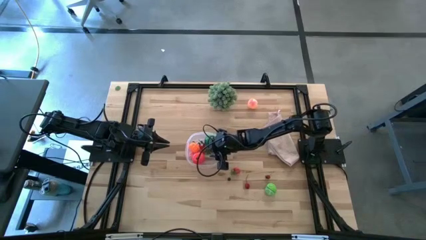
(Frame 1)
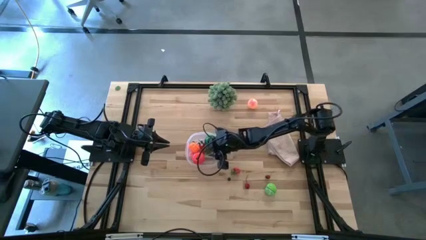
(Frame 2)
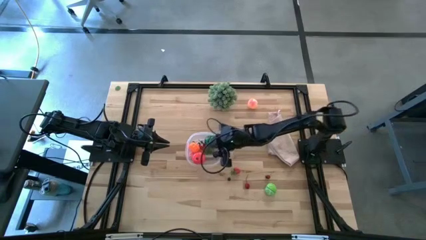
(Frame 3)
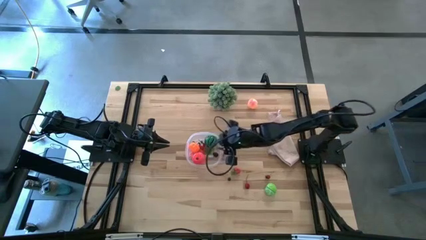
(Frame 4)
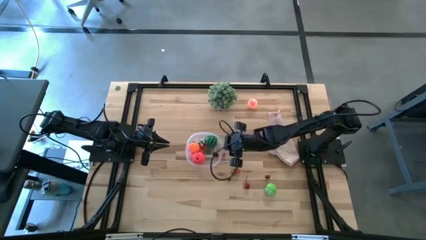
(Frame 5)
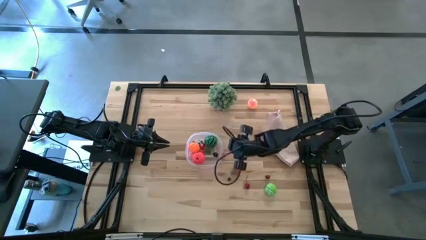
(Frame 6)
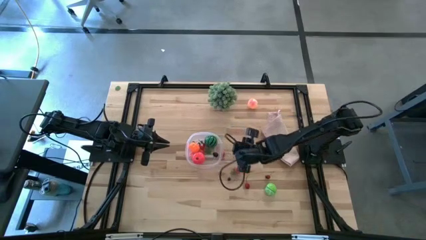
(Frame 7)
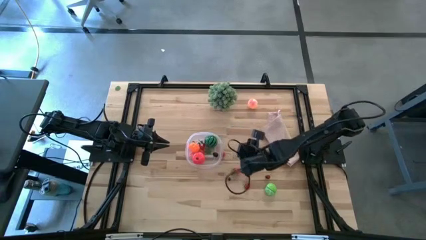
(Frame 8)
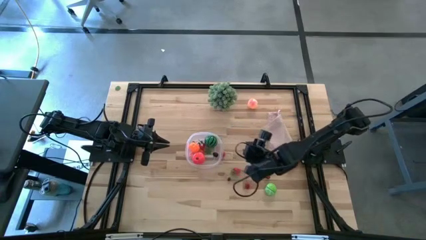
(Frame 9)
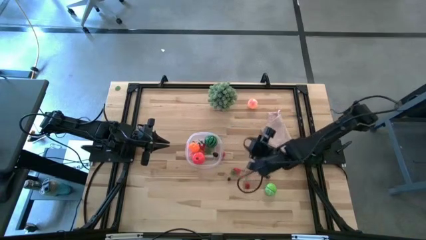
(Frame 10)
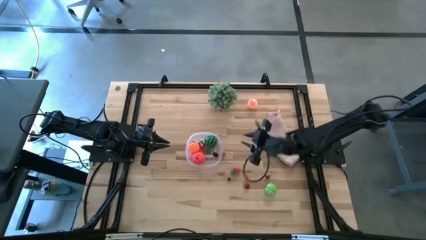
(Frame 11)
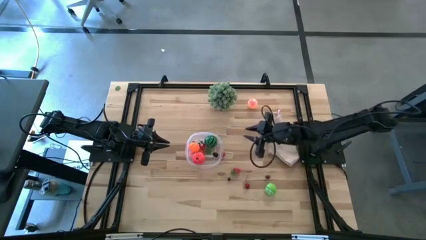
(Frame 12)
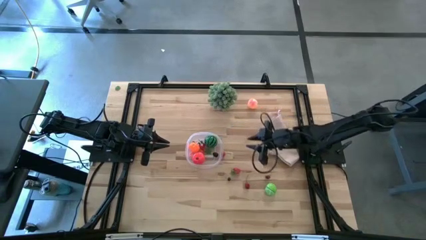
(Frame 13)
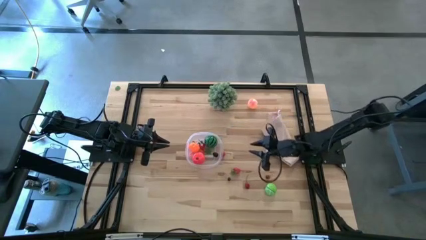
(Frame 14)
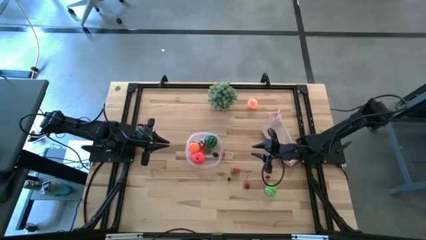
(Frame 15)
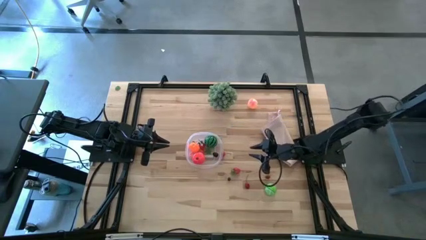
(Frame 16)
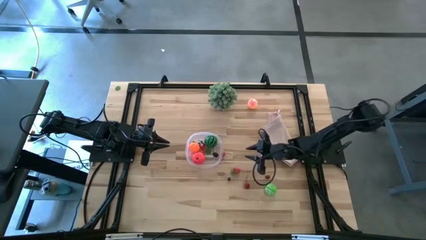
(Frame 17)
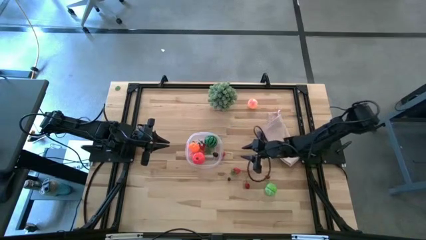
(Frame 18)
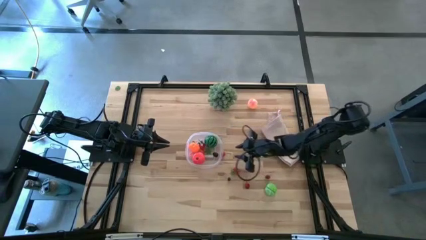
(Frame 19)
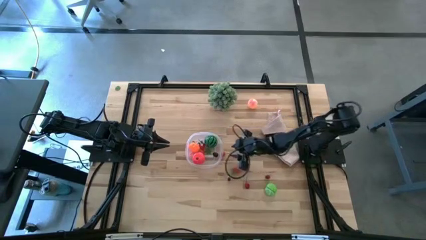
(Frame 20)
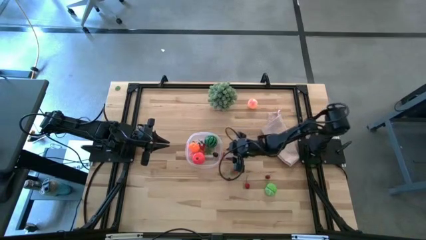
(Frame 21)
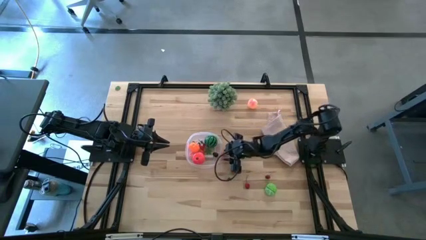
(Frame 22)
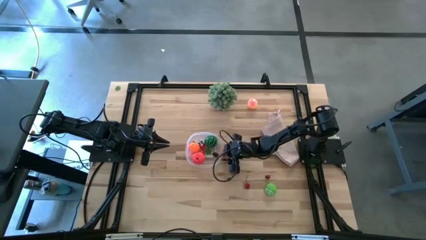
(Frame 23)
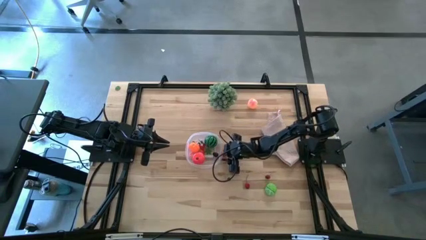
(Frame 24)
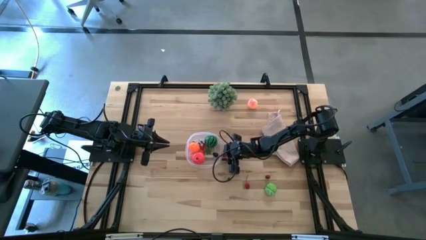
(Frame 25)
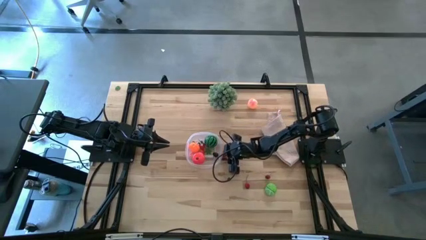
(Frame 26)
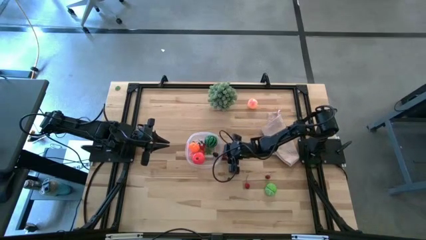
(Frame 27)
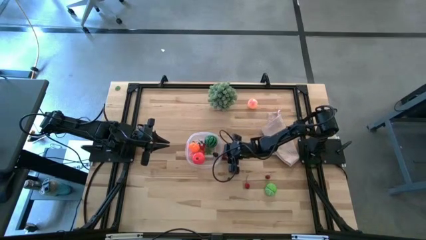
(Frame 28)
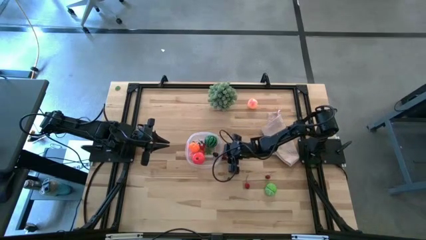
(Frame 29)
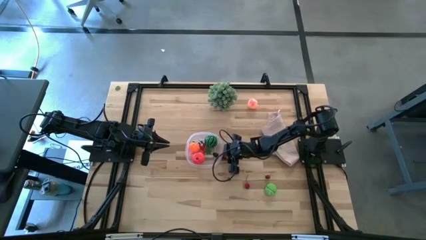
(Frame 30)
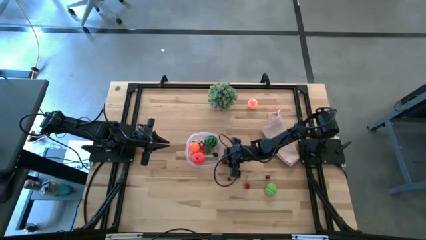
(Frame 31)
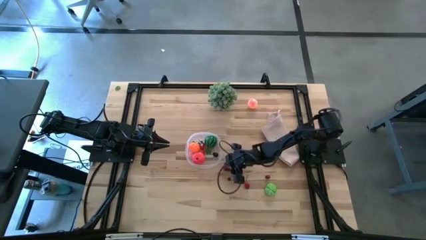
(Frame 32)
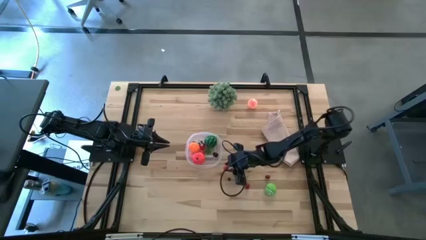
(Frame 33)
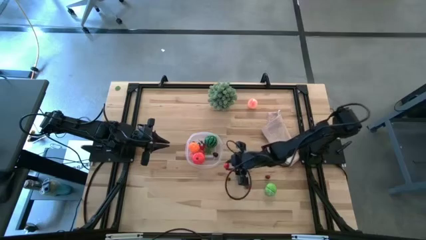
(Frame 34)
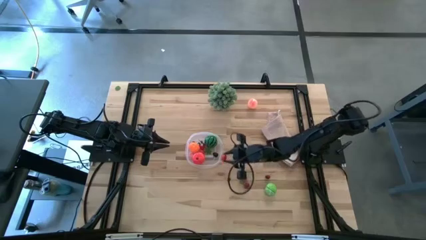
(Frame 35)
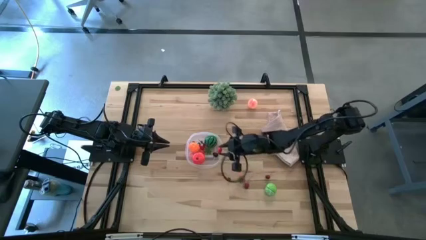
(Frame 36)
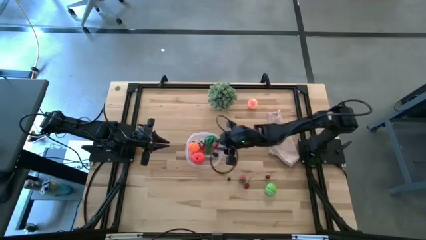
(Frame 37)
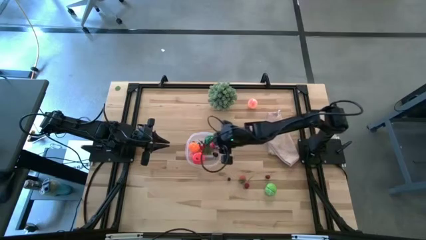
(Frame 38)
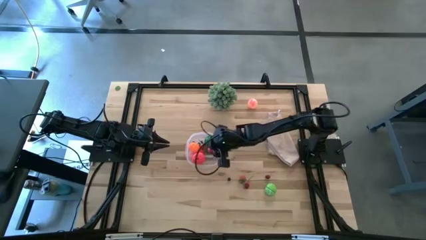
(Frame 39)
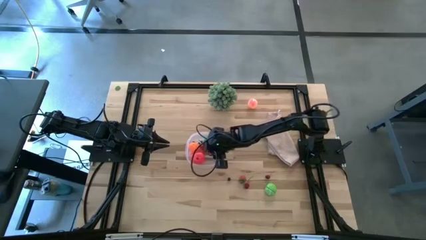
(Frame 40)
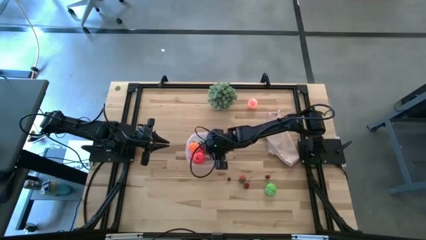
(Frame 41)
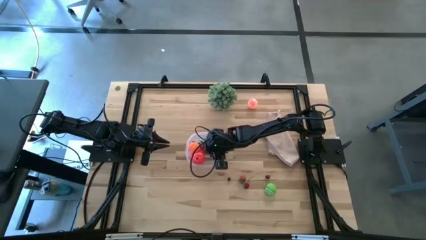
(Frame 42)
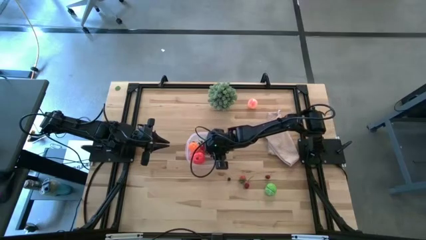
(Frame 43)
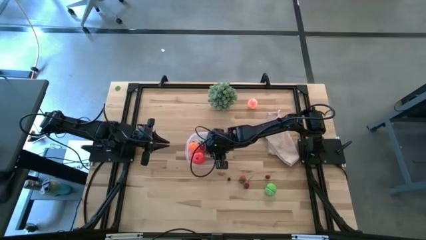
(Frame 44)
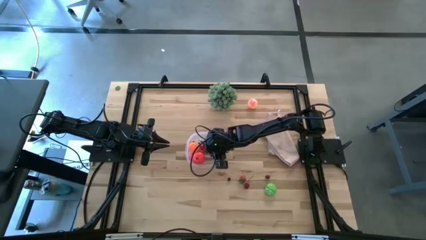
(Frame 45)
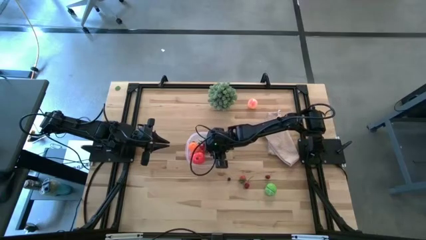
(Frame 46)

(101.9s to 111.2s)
Task: Pick and placing Produce into tupperware
Put the top red cherry into the transparent bin

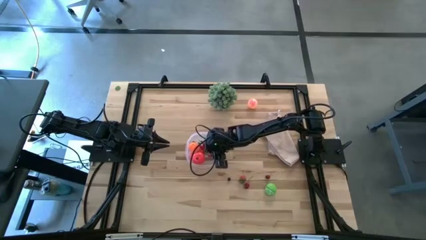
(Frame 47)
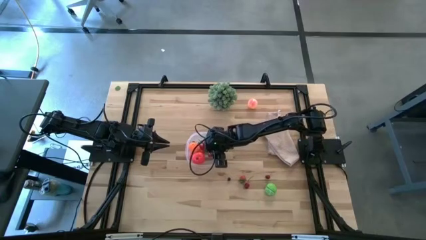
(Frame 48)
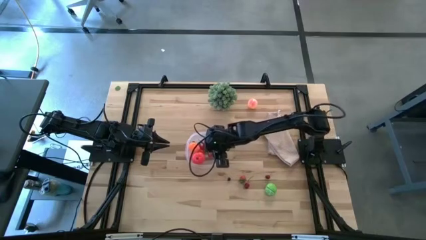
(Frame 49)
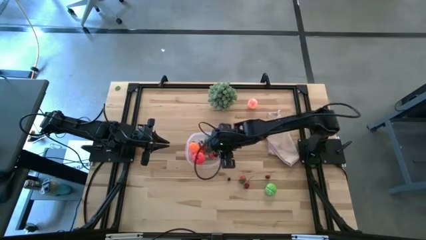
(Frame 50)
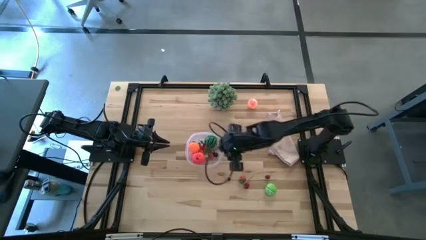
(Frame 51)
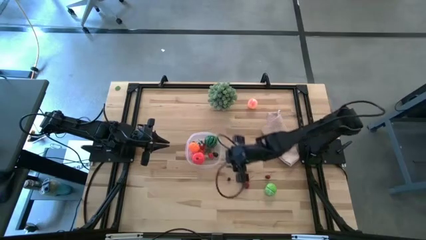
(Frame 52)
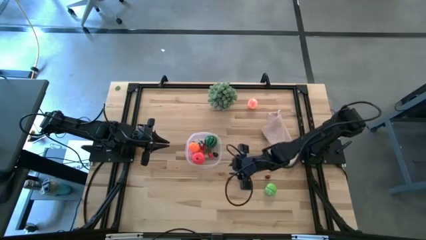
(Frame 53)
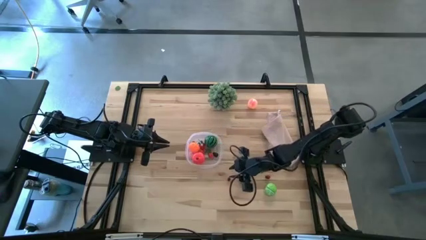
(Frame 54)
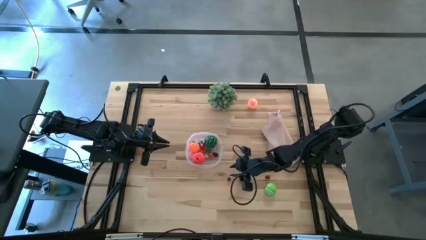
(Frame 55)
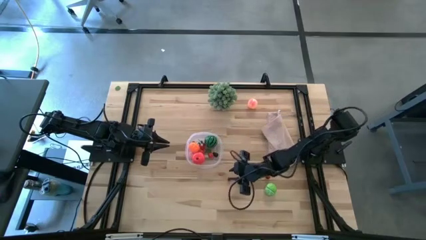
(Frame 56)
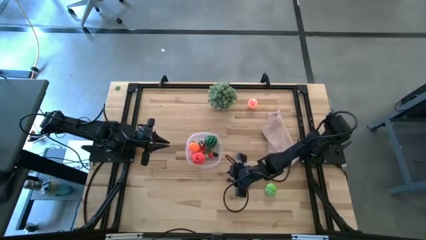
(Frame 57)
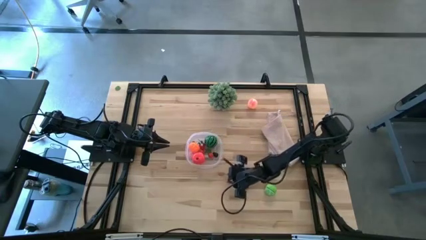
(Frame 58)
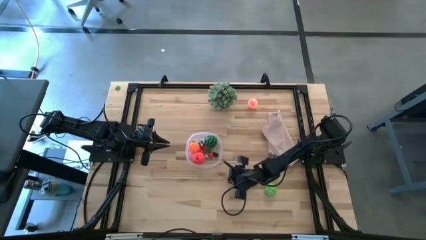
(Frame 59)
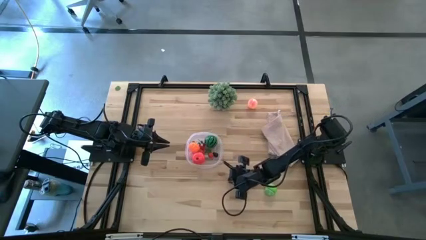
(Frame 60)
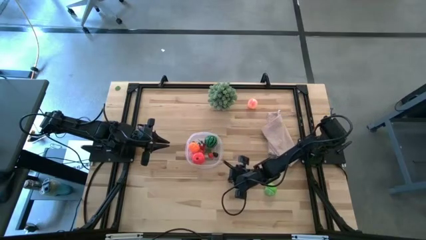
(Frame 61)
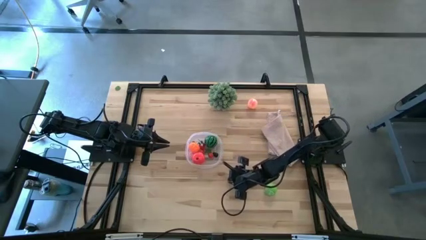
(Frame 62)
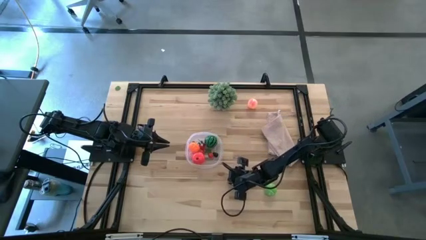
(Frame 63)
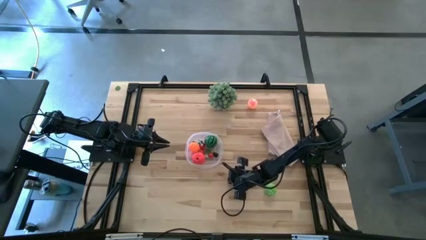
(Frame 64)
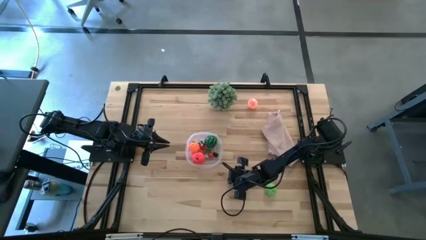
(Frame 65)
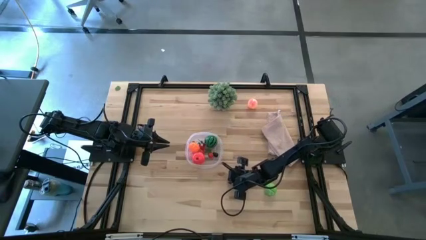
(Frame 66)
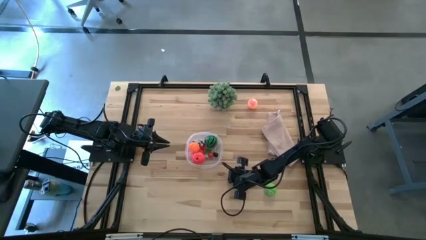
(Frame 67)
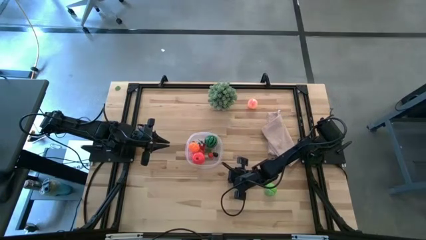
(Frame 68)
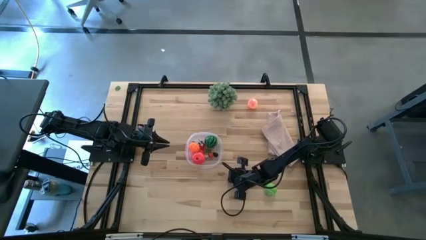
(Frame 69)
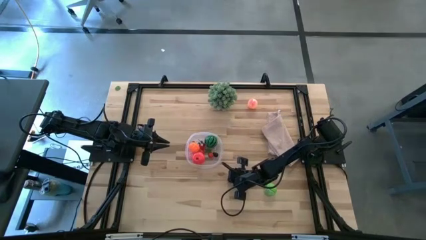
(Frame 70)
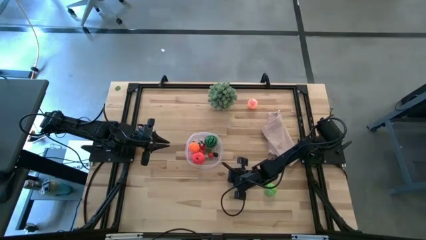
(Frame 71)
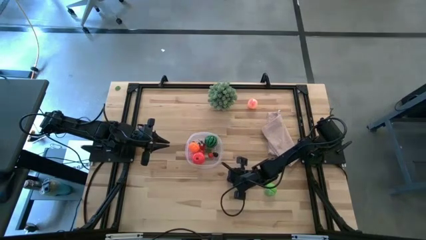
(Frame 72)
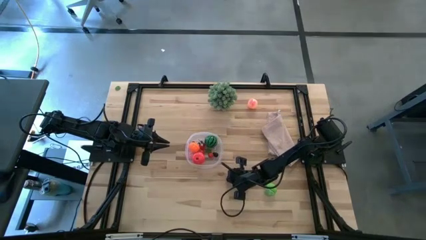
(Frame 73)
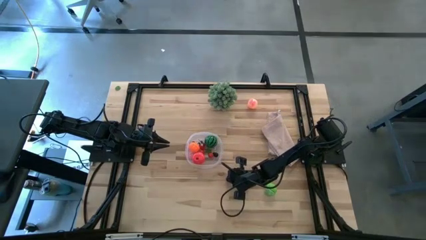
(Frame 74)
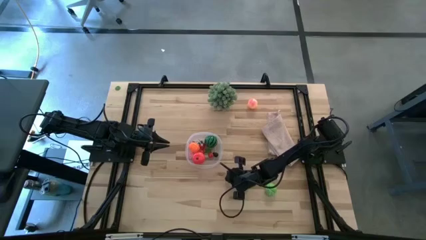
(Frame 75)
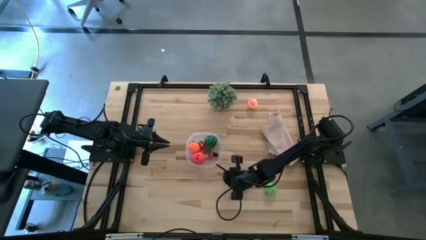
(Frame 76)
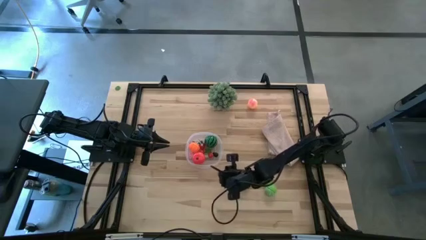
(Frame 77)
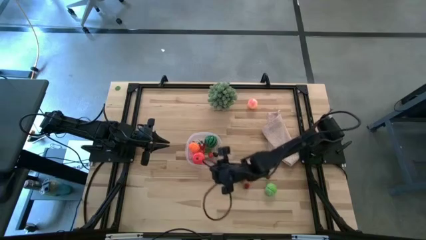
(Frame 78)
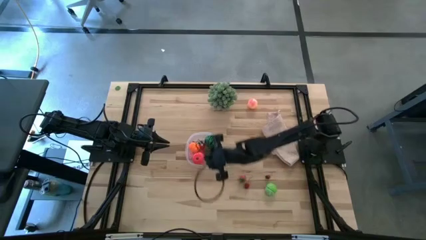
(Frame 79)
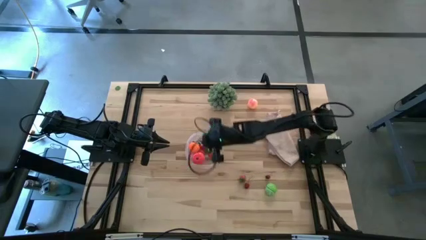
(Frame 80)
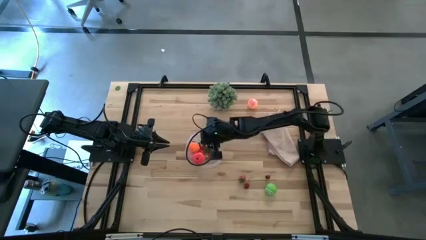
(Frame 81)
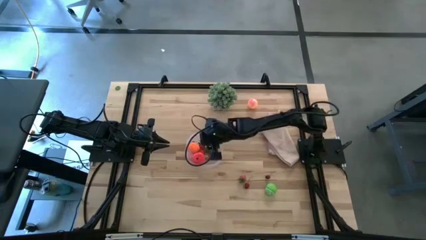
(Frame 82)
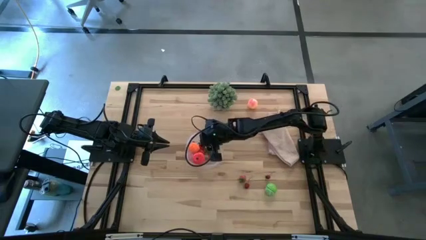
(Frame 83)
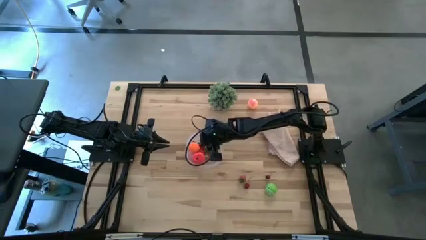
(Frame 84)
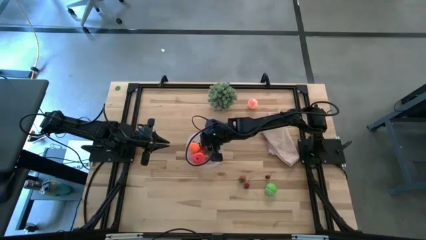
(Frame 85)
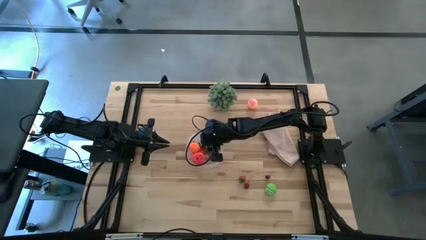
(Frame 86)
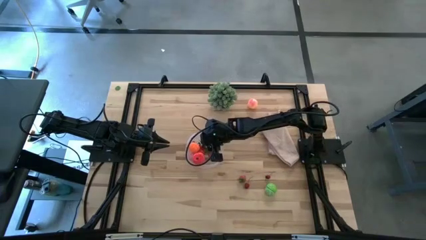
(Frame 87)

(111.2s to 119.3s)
Put the blueberry into the transparent bin
